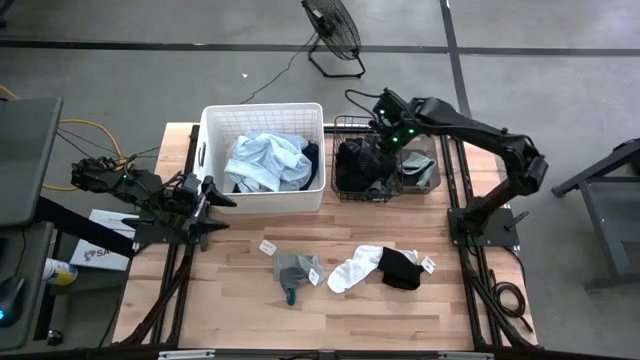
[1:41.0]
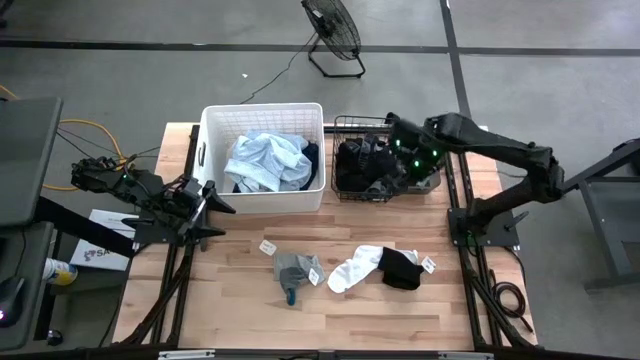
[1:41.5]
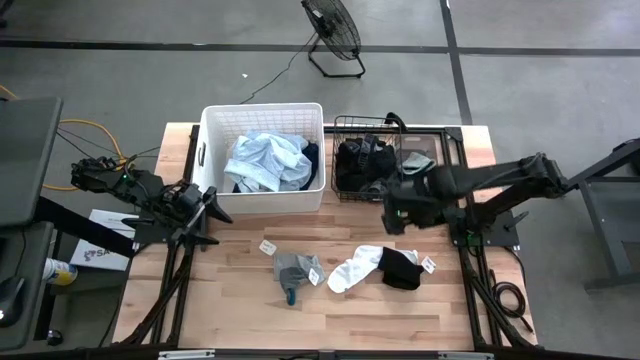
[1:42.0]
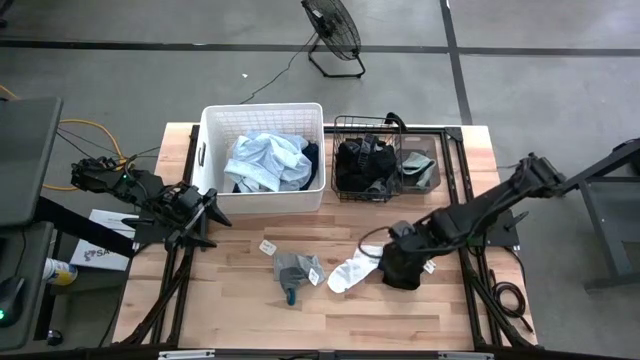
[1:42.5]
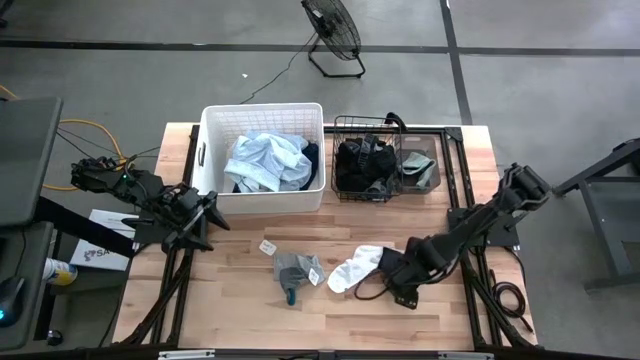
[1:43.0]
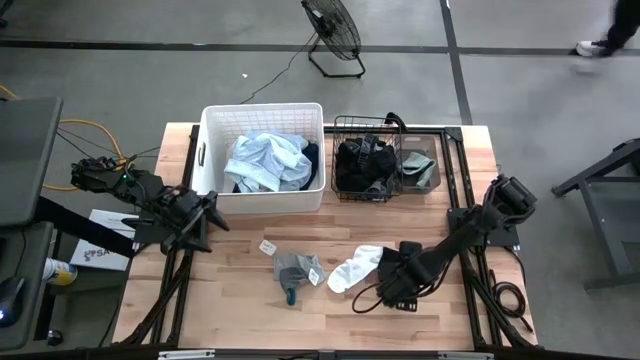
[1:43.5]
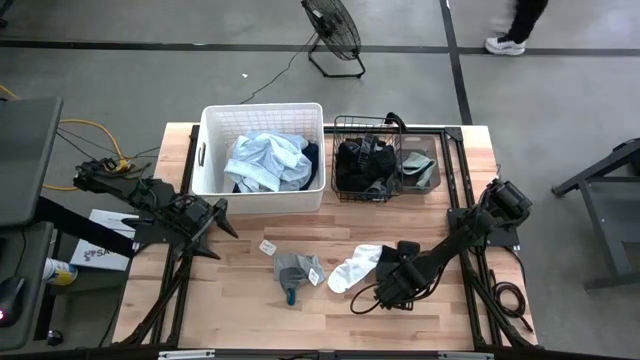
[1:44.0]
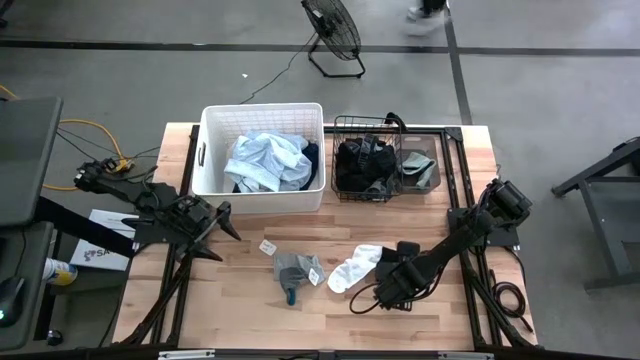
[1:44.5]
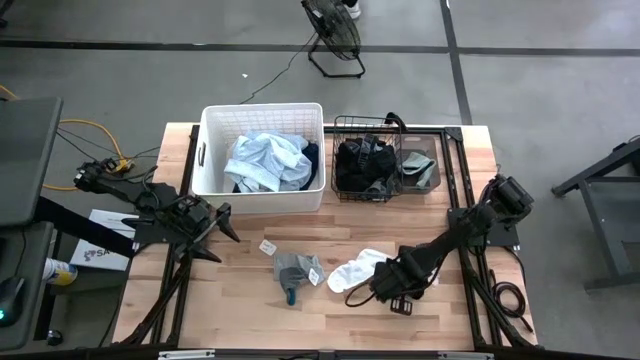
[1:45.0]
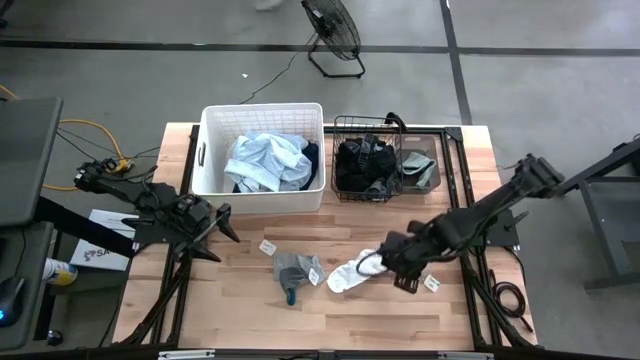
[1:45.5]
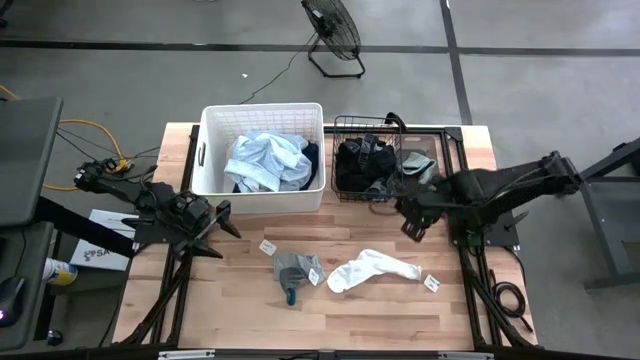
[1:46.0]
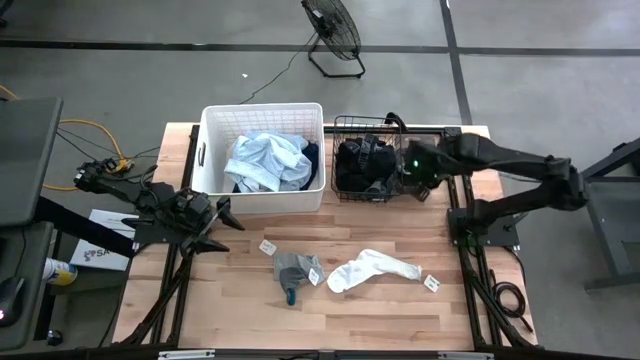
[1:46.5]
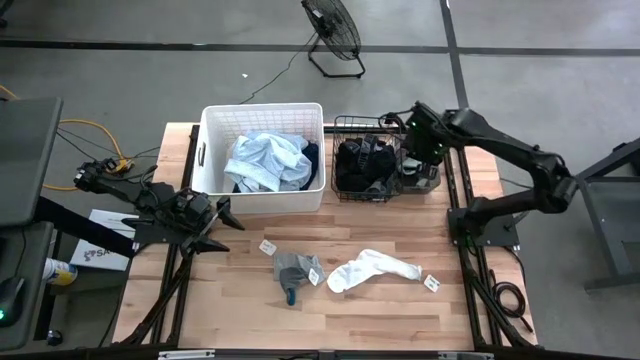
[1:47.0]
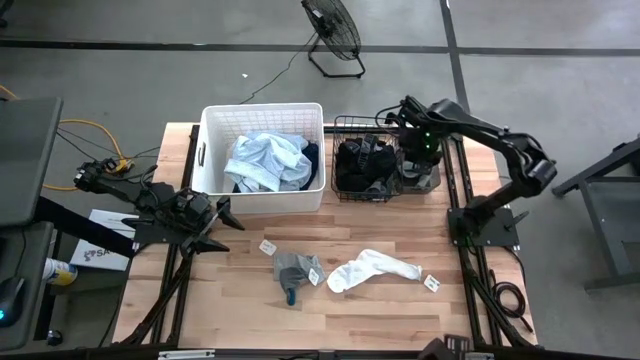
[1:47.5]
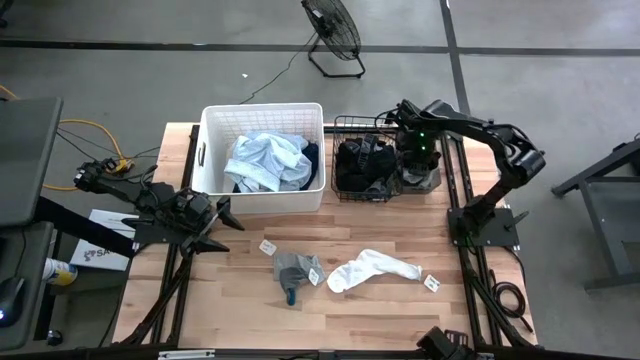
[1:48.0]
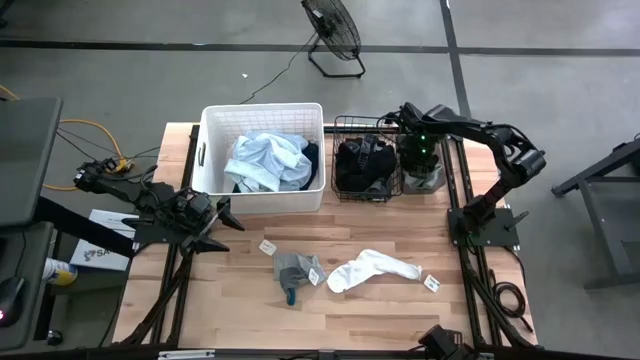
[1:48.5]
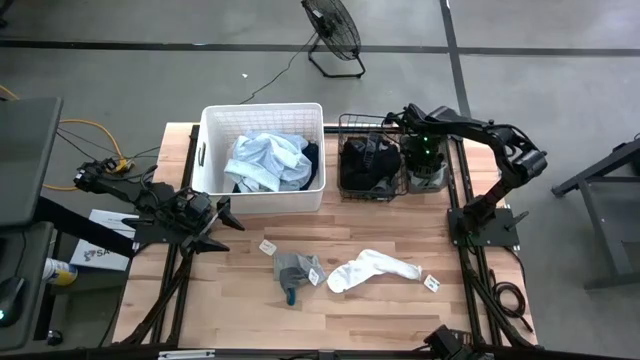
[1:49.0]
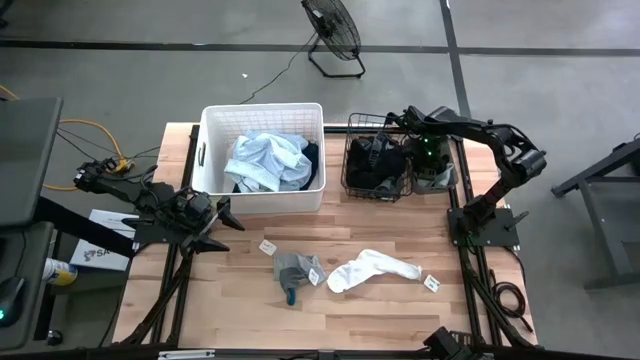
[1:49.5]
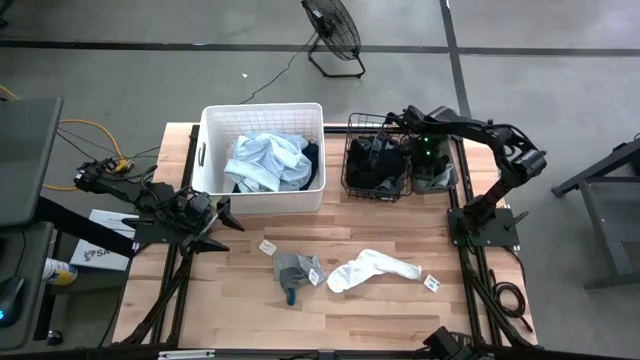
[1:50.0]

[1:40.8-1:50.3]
Task: Pick & Place Cloths
Put the black sock into the black bin

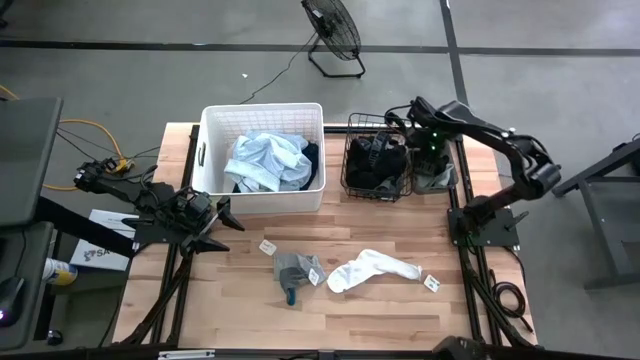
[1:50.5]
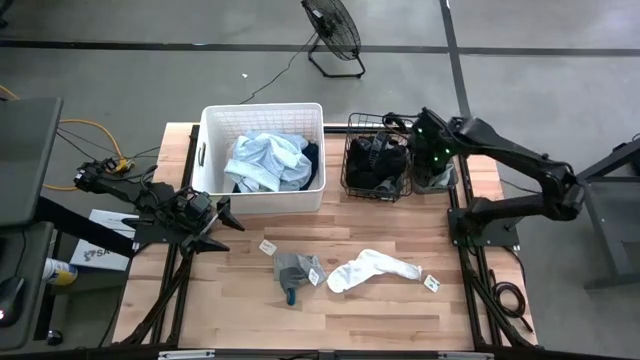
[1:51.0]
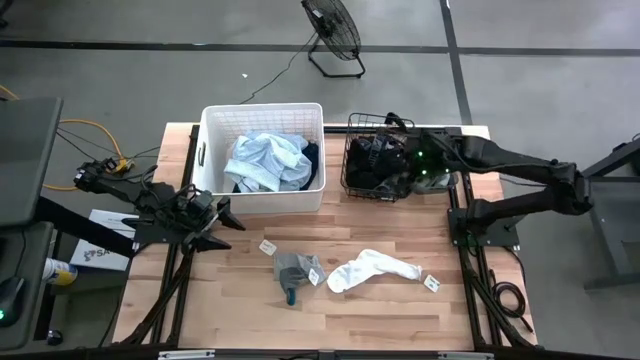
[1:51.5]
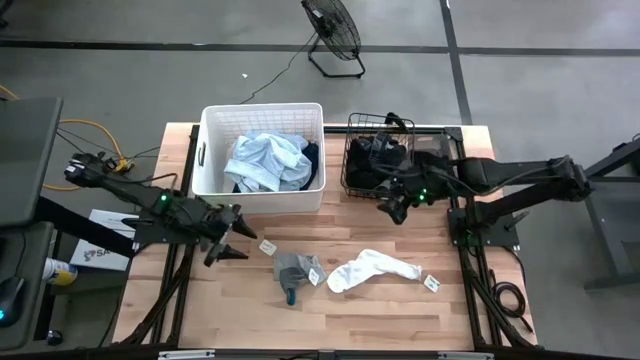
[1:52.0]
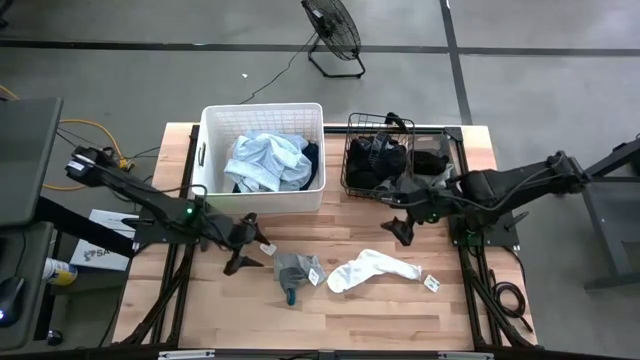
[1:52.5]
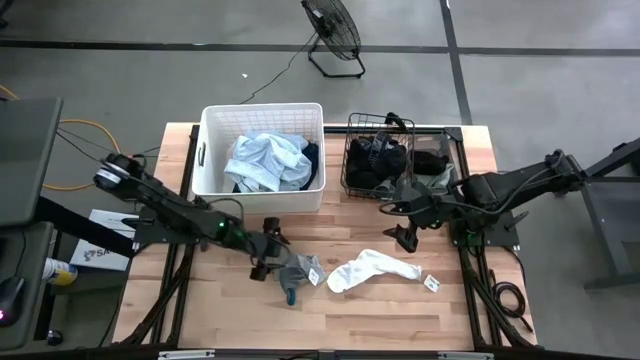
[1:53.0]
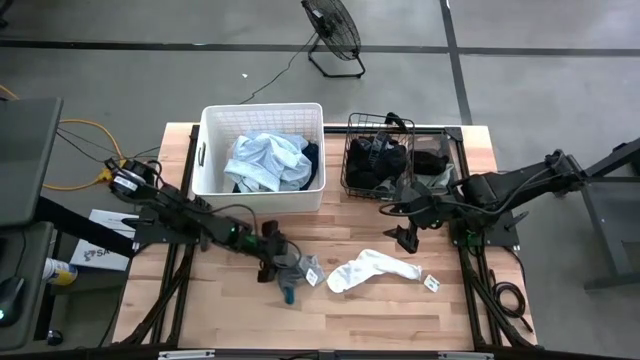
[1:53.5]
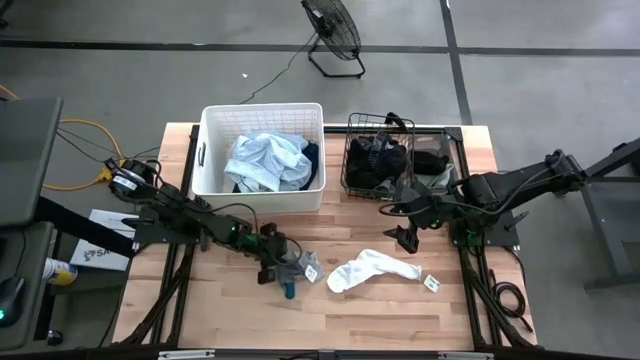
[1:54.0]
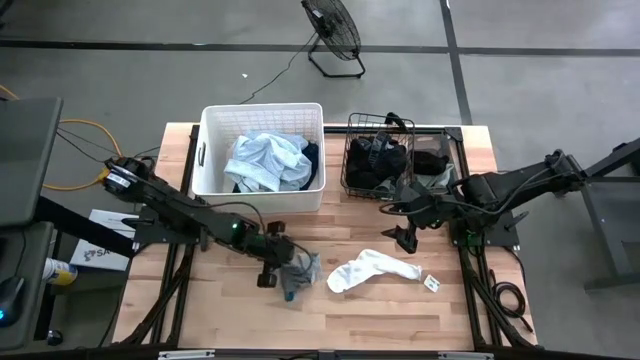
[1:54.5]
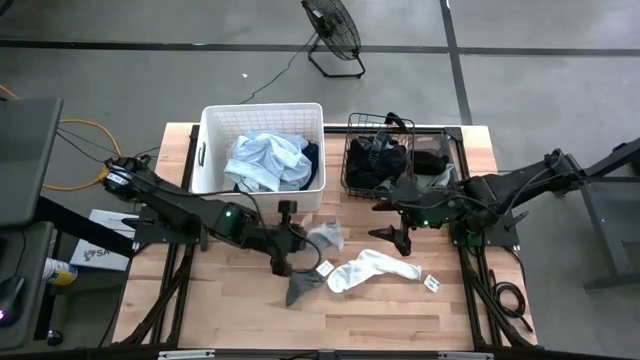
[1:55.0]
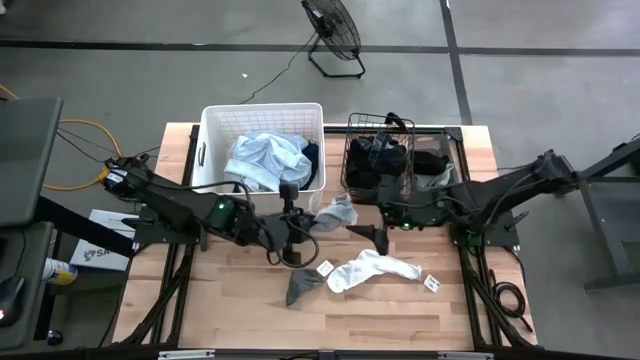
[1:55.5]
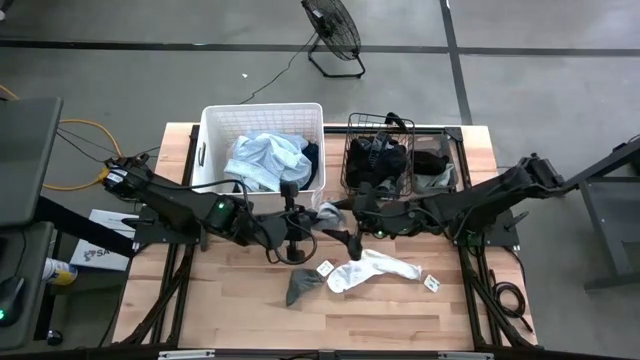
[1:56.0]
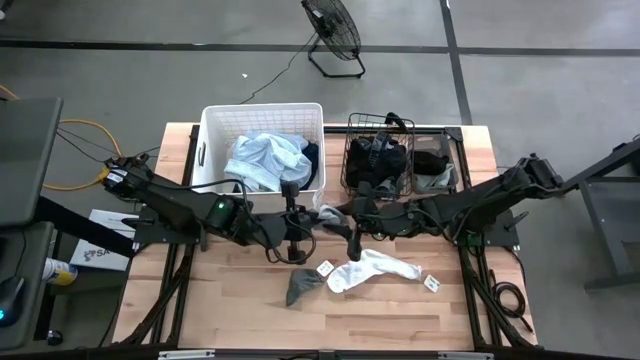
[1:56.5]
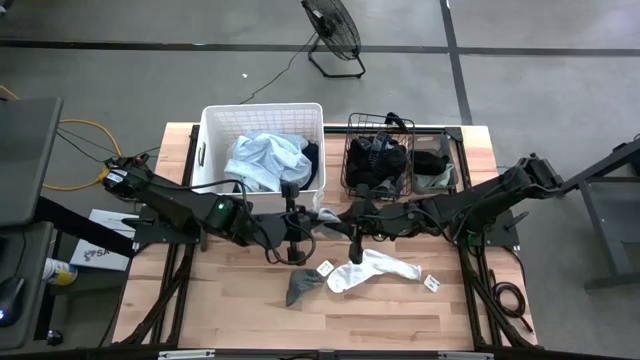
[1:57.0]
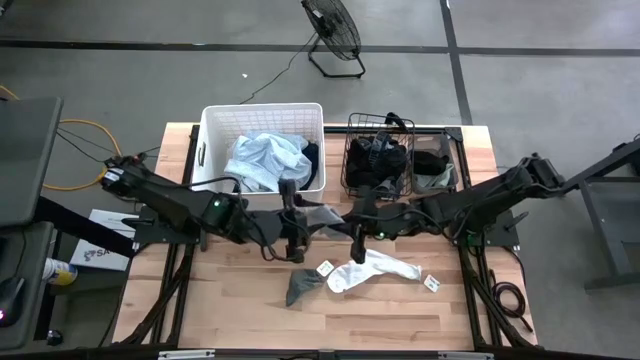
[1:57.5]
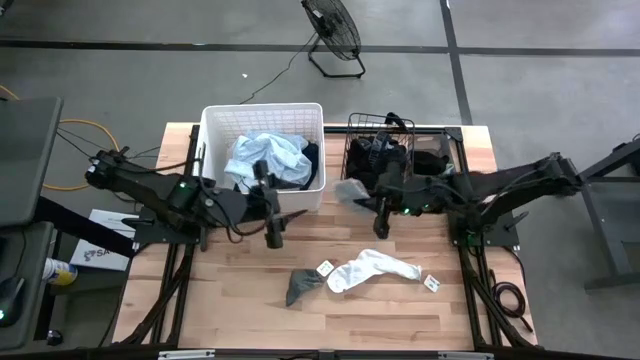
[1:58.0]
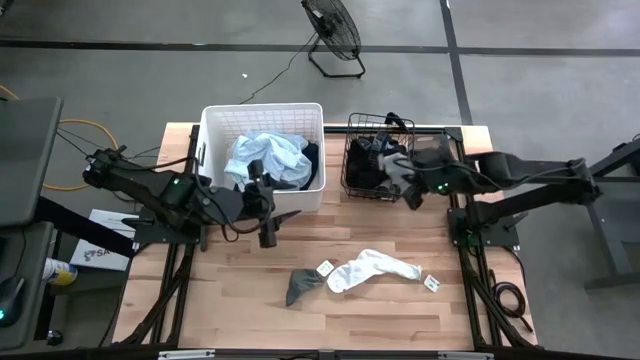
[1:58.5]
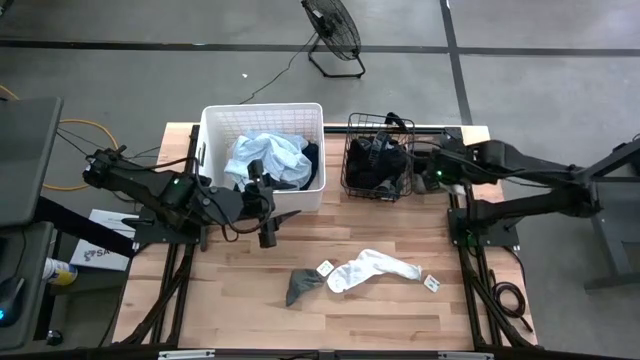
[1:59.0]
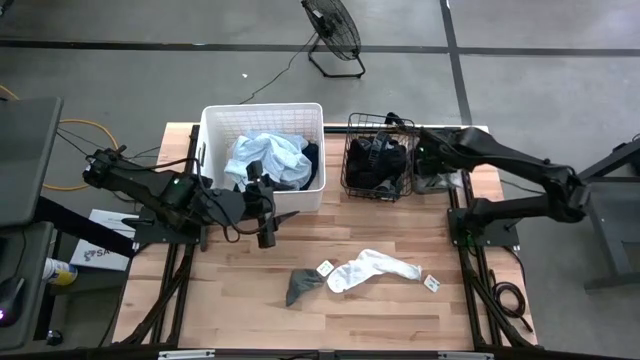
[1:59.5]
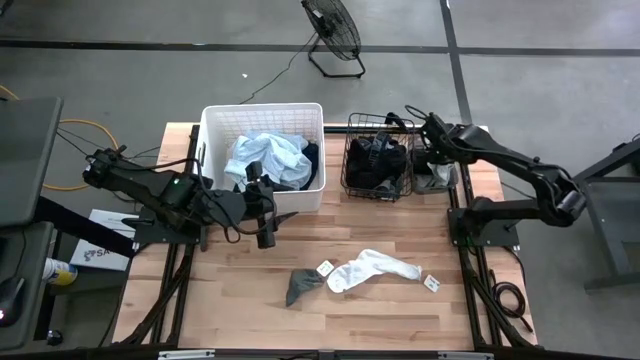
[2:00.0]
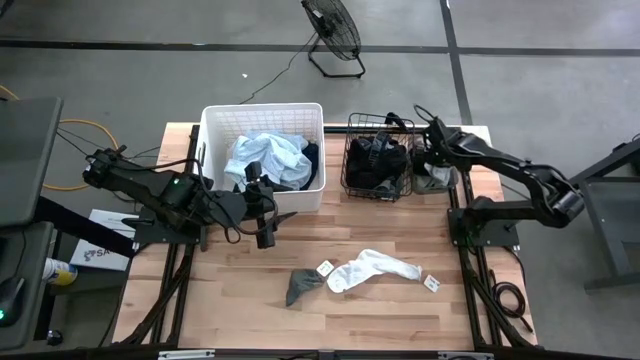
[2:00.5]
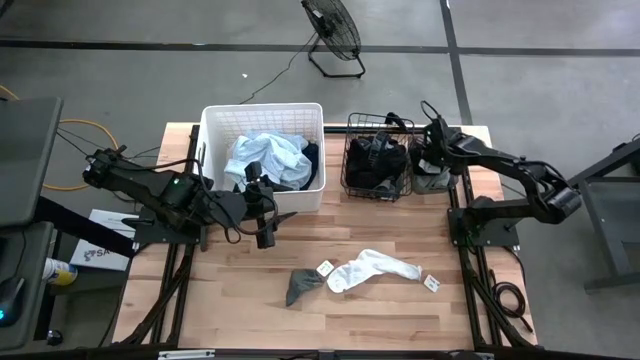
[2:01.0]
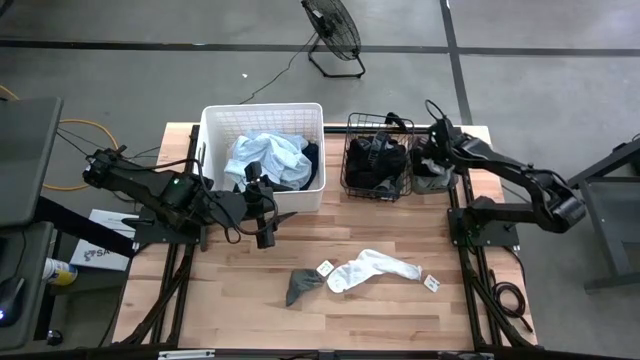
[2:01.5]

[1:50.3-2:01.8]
Put the gray sock into the black bin

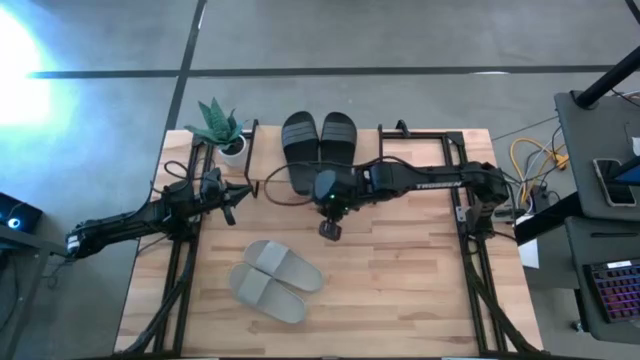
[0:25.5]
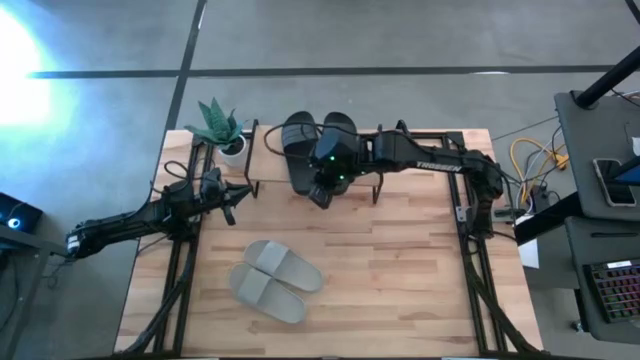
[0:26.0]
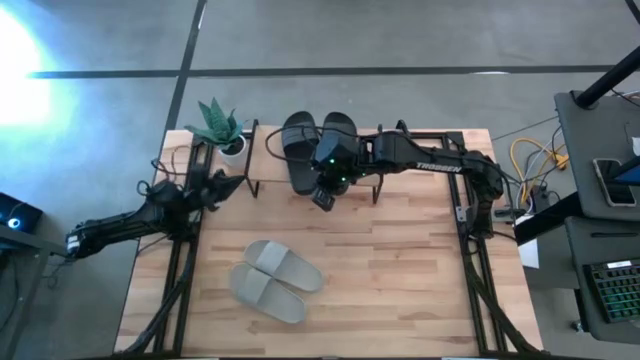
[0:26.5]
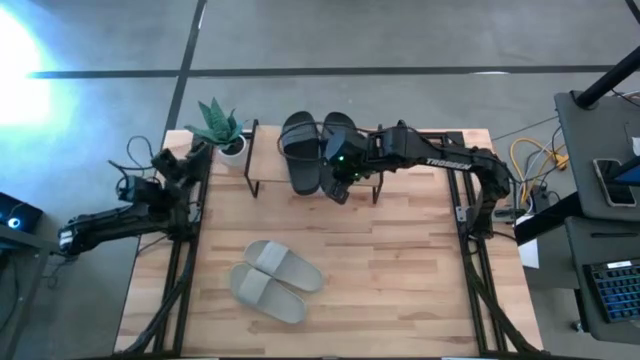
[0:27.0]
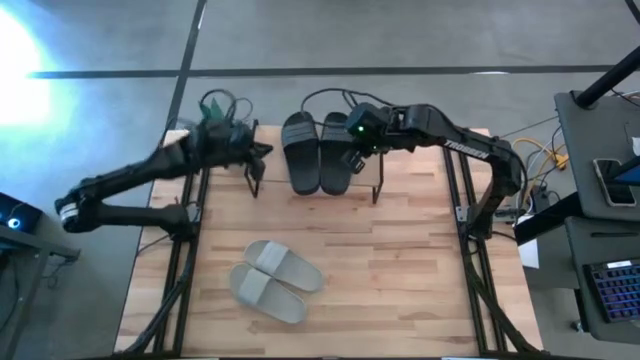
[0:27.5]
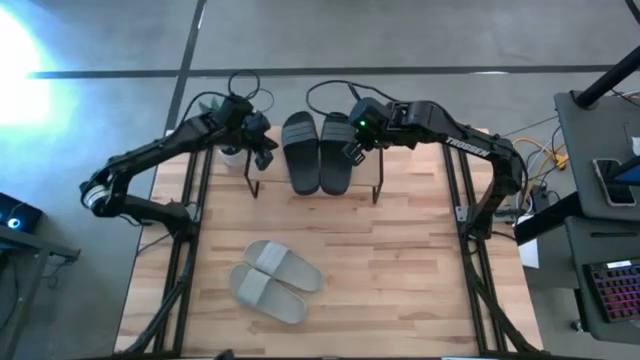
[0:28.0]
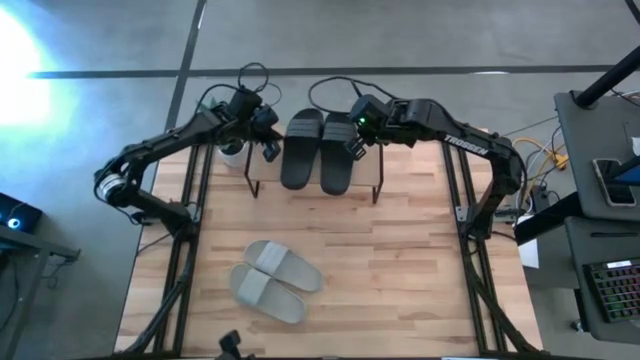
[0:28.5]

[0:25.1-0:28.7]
Task: Pick and place slides into the shelf
Adjust the black slipper on the shelf
